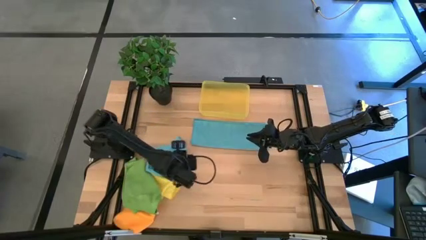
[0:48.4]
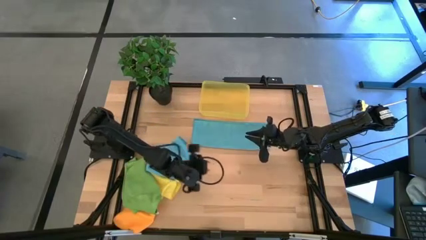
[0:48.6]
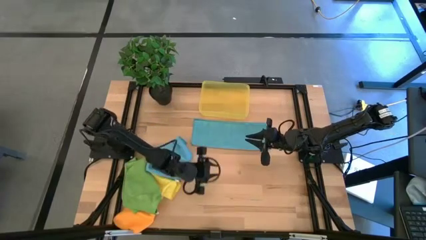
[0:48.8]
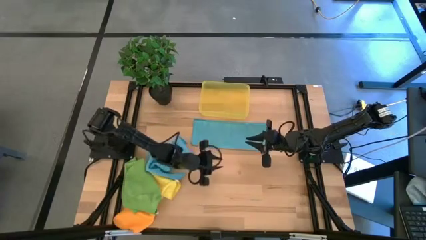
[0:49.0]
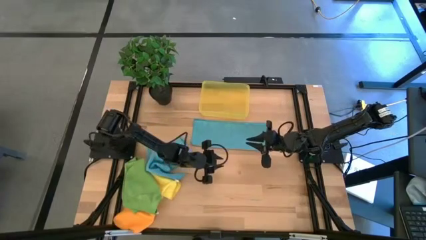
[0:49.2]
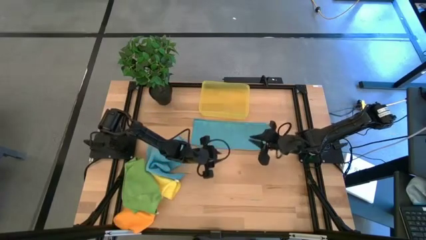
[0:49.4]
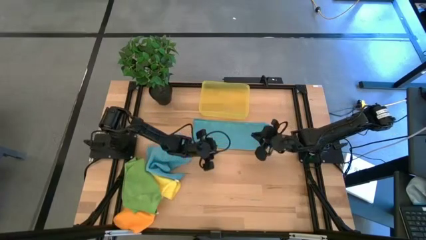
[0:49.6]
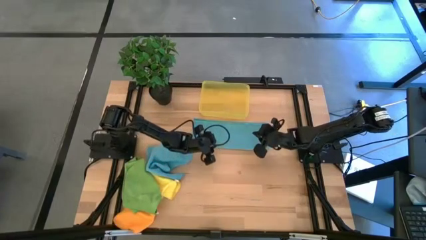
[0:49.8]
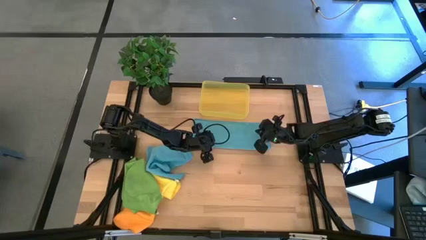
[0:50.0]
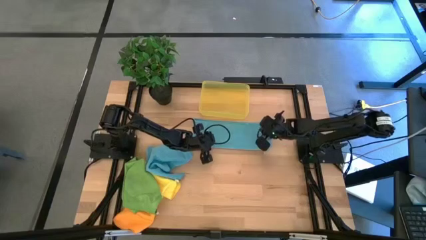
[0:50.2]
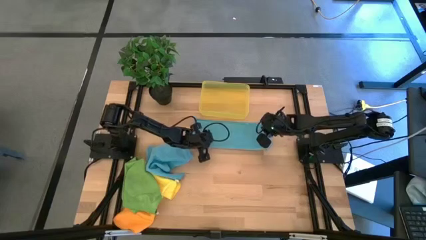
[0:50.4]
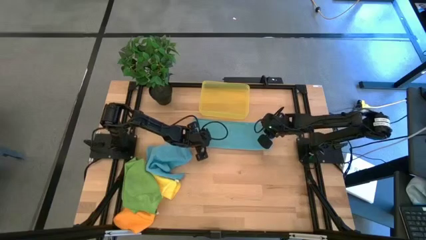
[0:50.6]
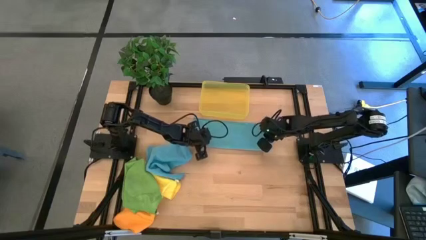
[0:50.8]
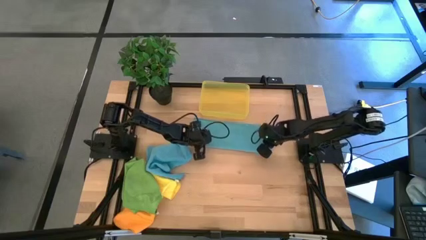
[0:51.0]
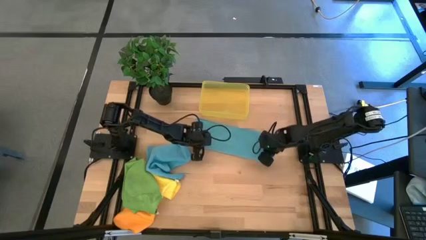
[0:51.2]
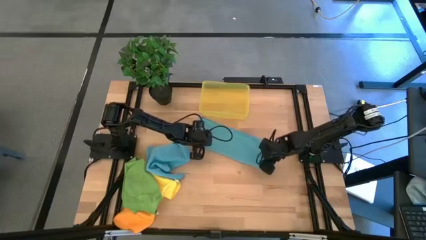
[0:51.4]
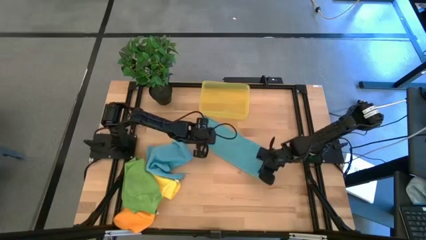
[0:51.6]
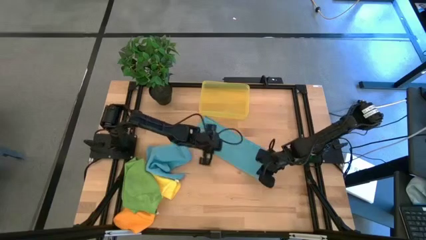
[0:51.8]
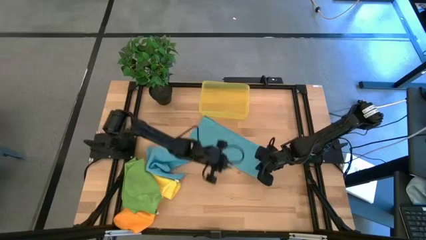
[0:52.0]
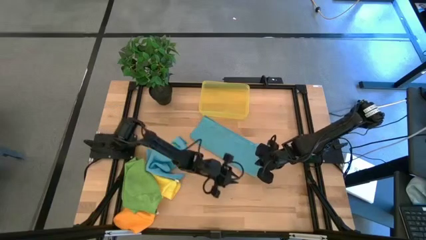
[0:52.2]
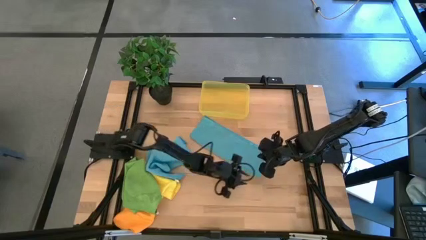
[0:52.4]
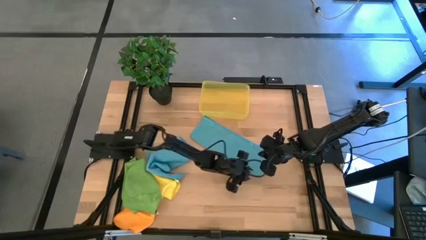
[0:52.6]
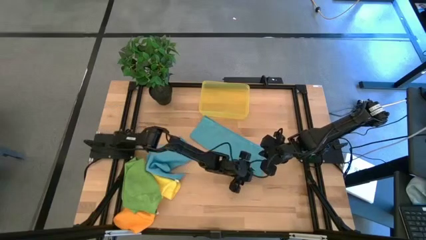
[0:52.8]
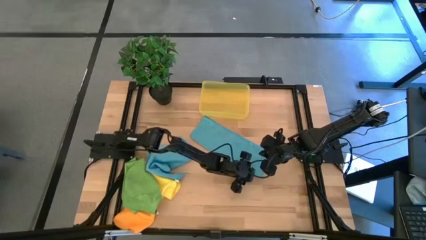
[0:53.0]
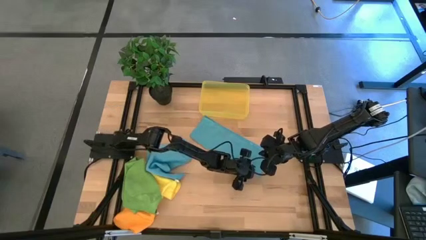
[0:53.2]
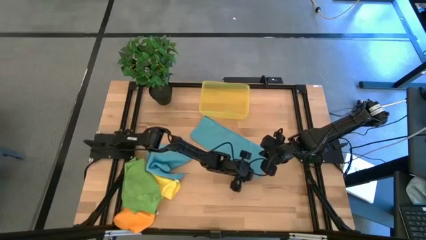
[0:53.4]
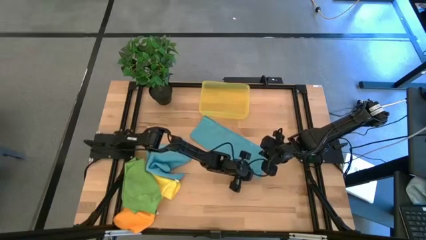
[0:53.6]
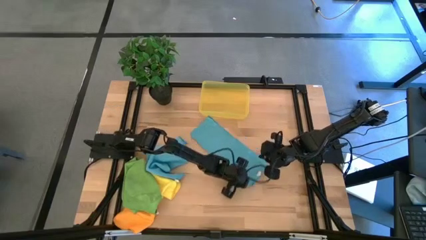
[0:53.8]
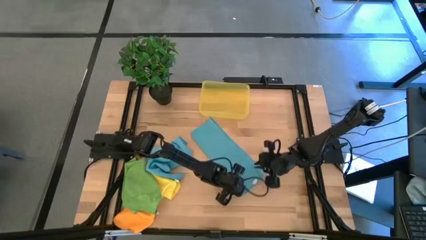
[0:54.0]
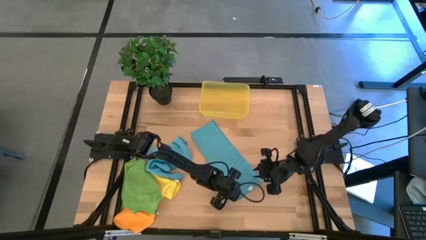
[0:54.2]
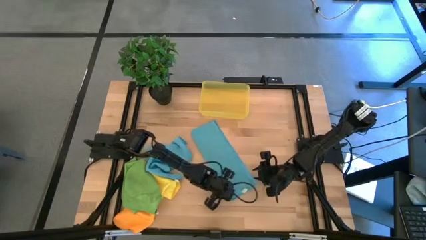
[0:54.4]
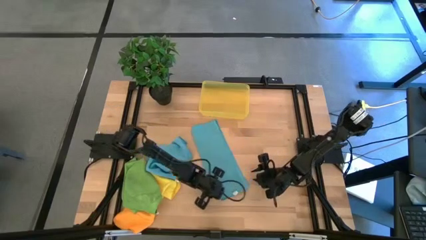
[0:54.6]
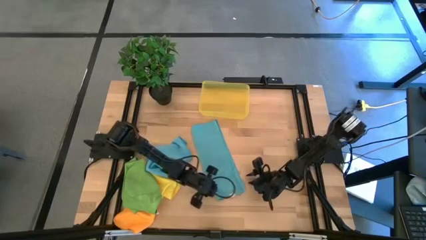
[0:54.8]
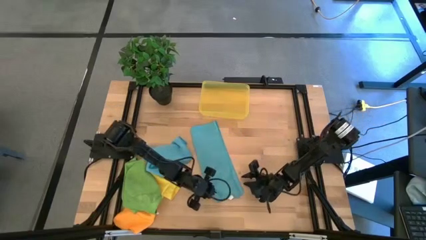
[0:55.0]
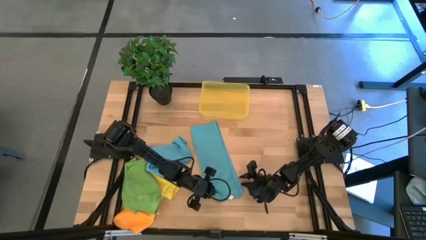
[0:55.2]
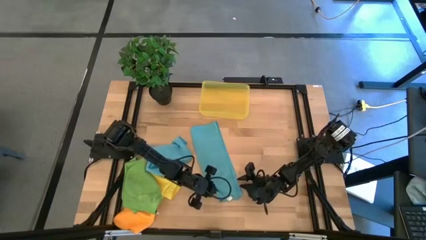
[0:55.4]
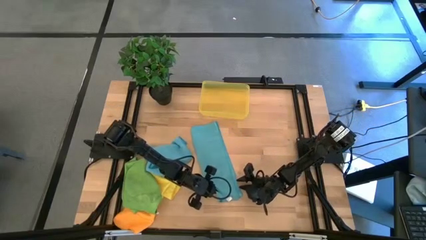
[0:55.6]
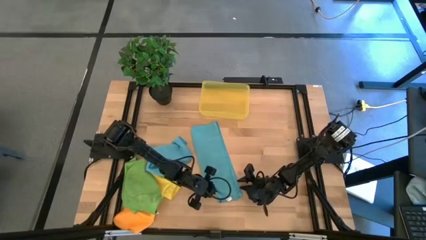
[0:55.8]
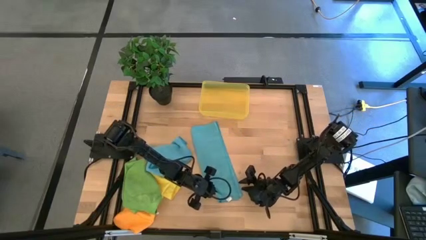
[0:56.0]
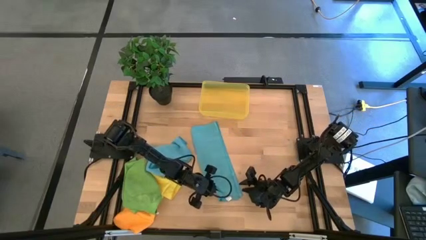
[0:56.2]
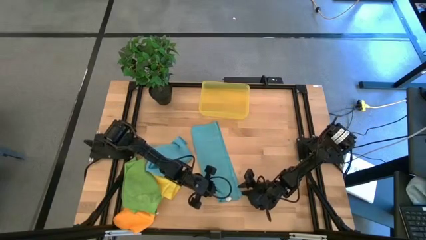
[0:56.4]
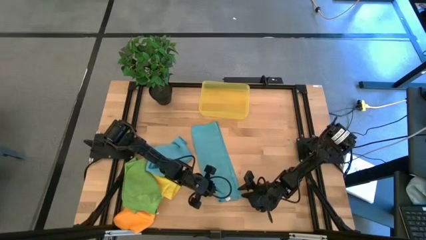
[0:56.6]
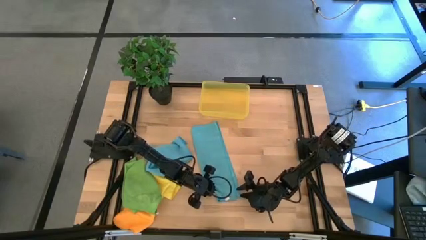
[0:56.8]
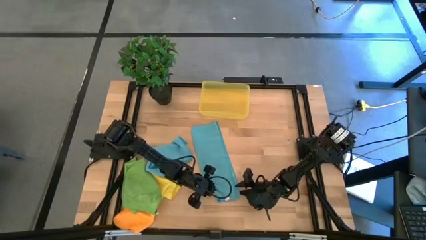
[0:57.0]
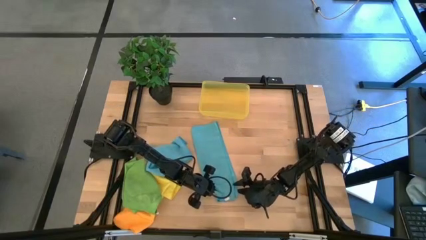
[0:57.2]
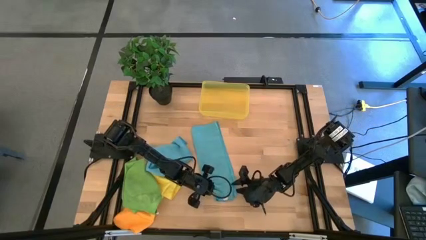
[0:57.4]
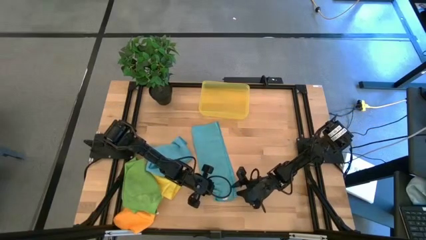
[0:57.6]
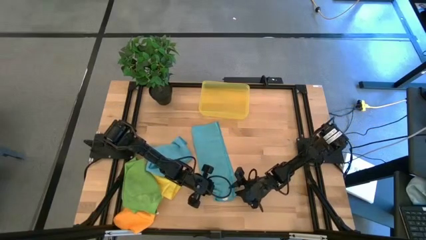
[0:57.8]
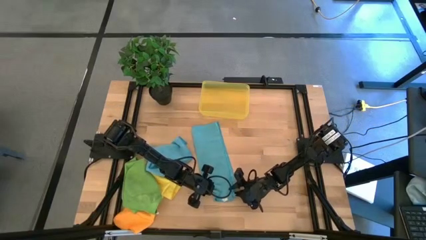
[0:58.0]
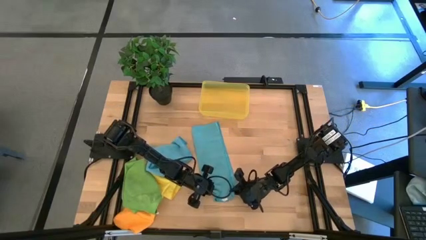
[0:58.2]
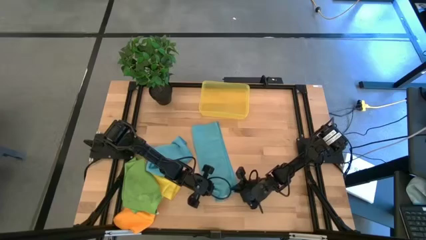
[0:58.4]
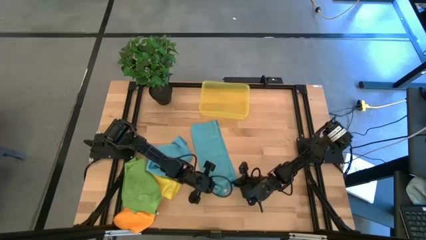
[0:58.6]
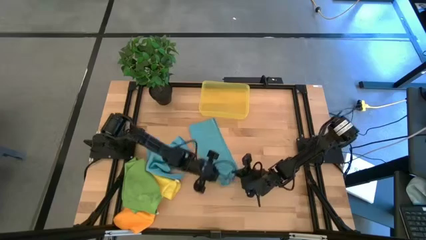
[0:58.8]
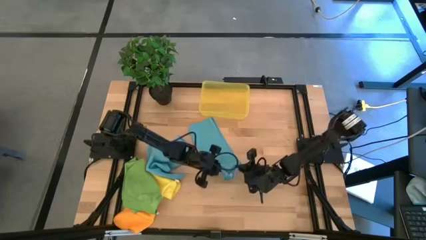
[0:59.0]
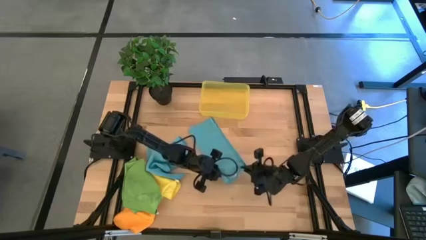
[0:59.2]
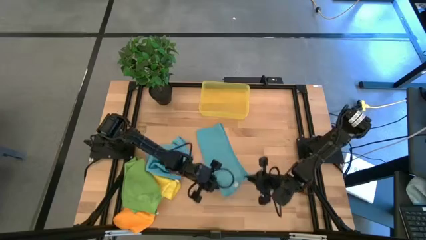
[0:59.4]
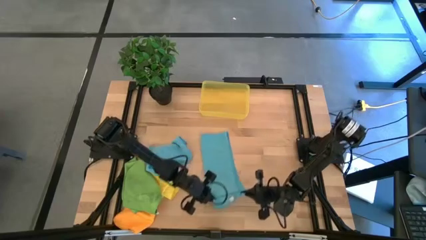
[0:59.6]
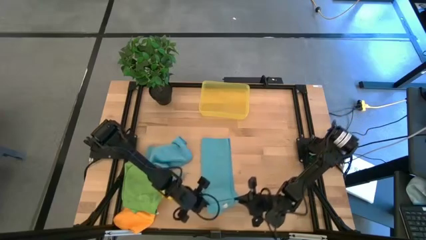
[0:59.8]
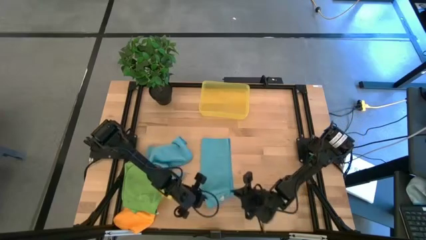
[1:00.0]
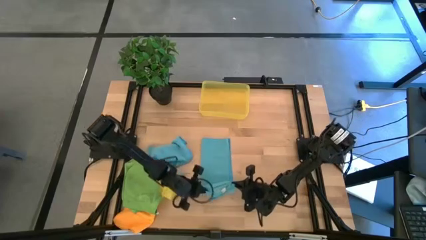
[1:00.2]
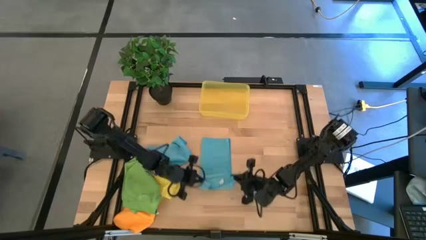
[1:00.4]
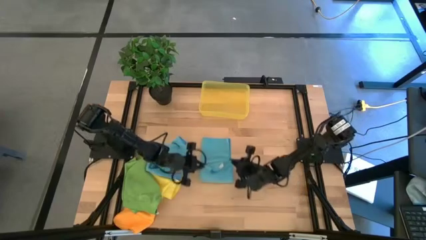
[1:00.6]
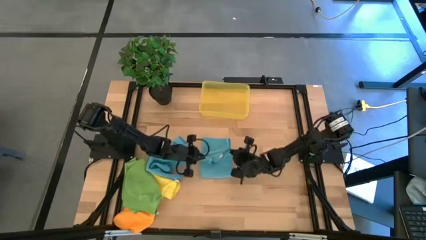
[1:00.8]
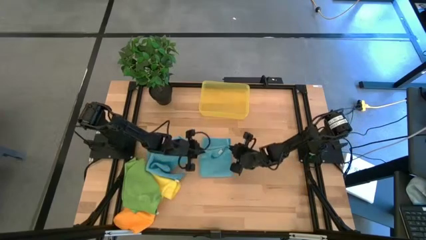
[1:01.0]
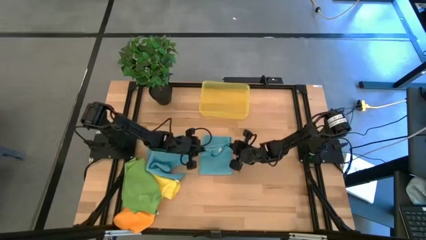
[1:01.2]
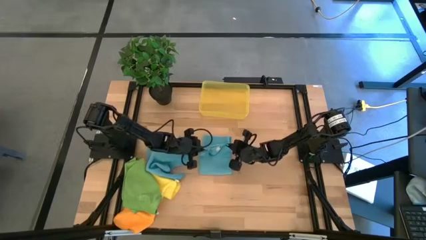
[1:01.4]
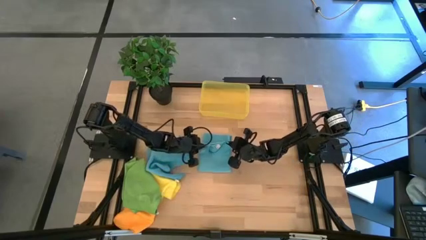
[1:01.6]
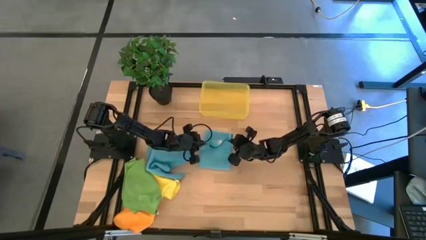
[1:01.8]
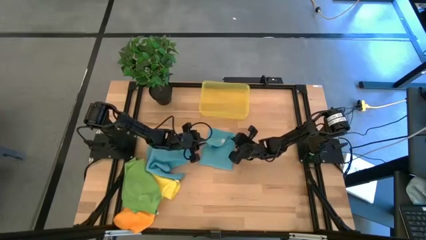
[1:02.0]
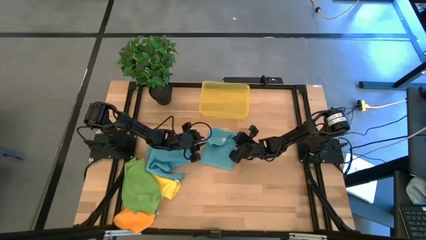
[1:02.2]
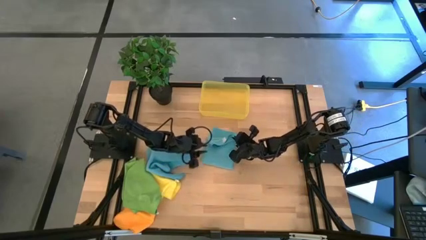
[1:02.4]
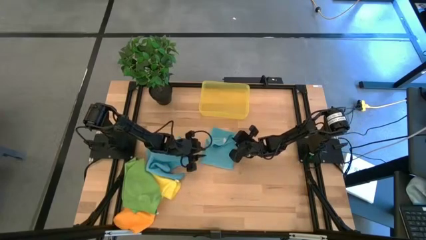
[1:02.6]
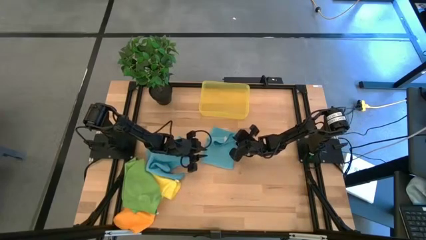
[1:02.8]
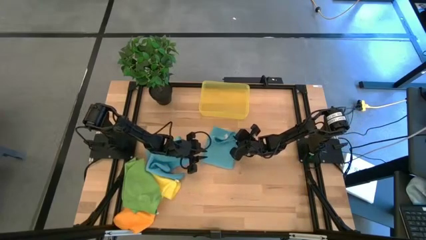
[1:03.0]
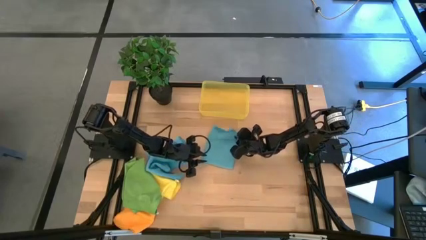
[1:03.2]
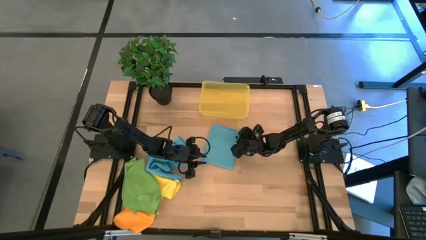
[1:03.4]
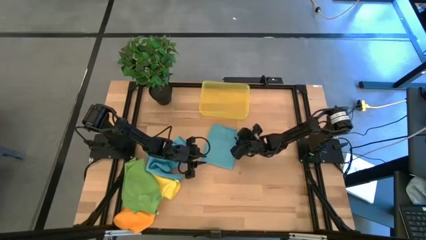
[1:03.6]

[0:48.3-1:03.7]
Task: Fold microfiber towels
Fold the left blue microfiber towel
